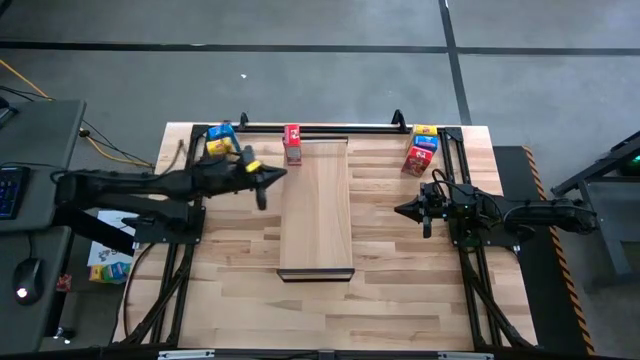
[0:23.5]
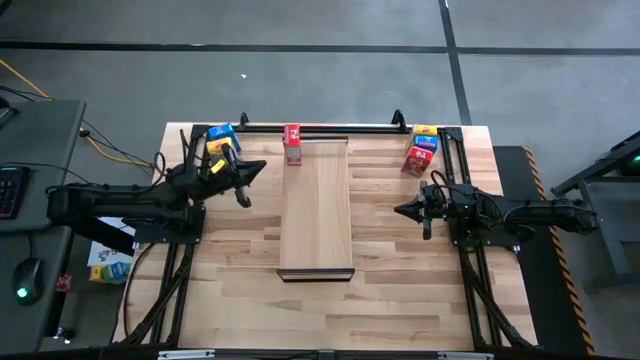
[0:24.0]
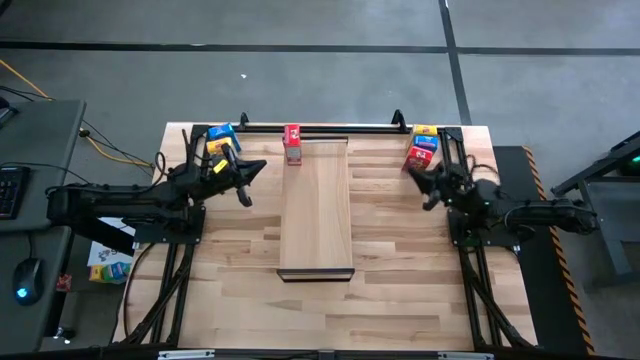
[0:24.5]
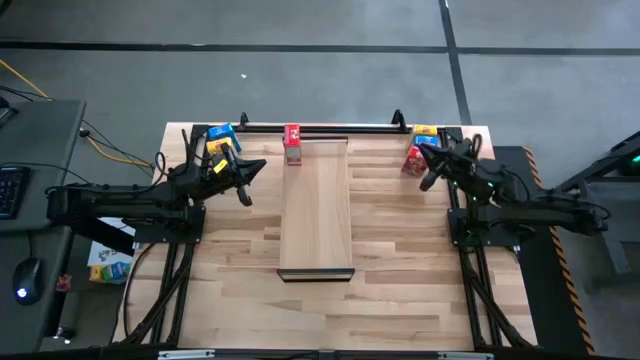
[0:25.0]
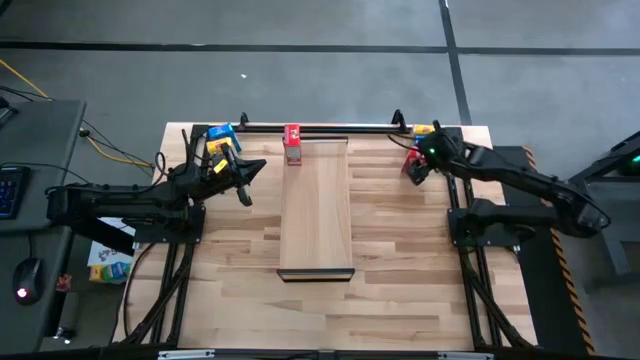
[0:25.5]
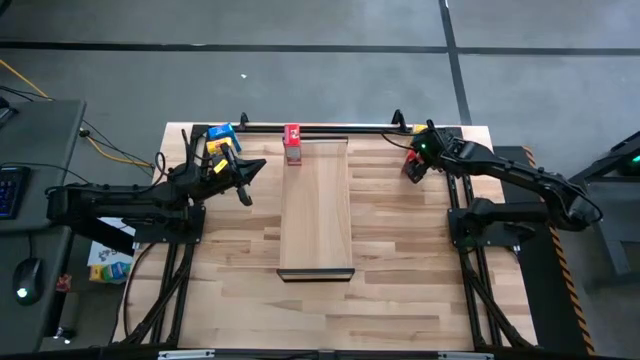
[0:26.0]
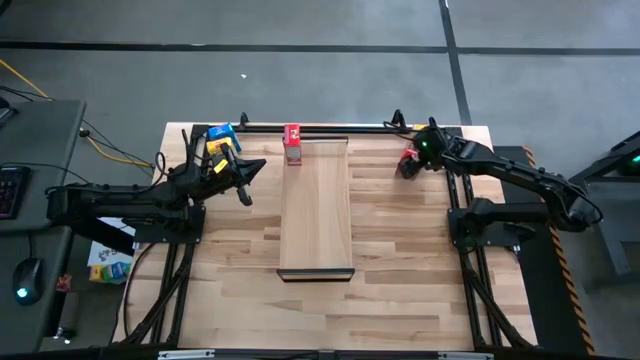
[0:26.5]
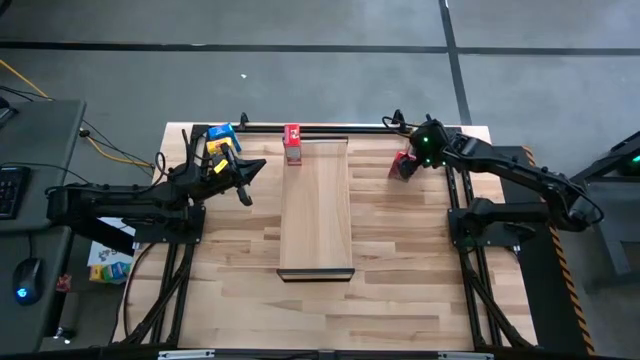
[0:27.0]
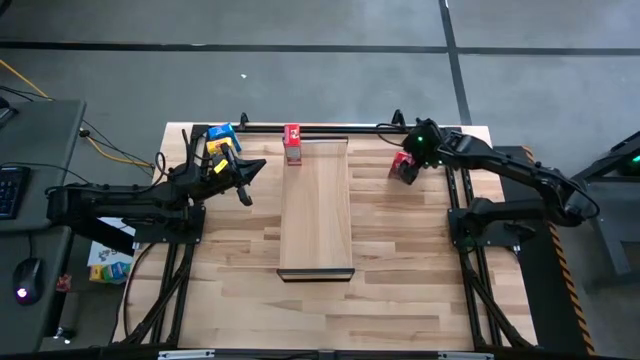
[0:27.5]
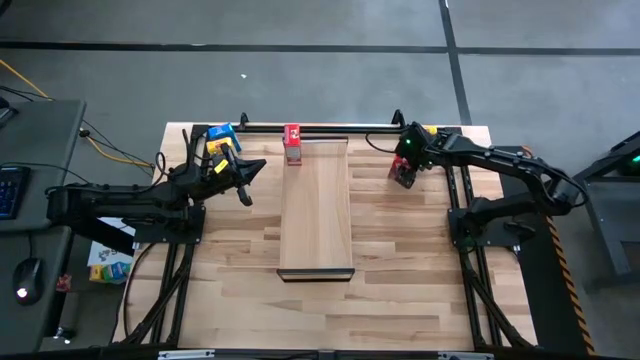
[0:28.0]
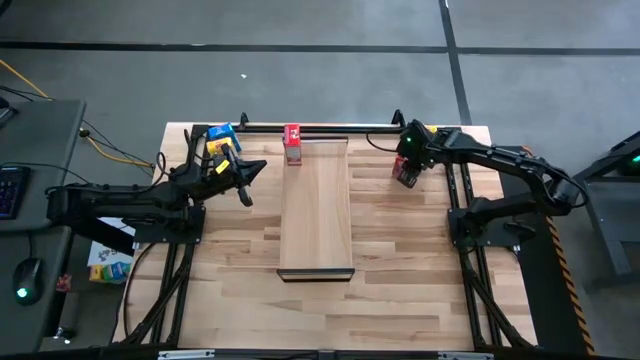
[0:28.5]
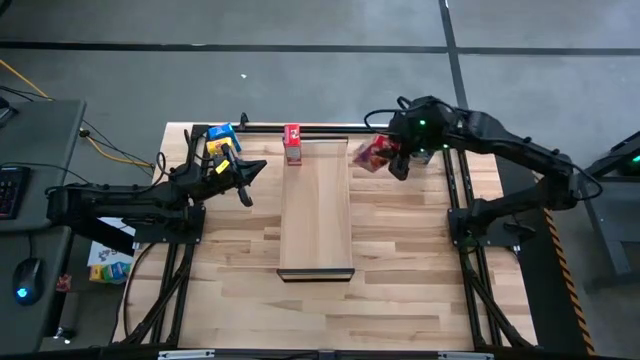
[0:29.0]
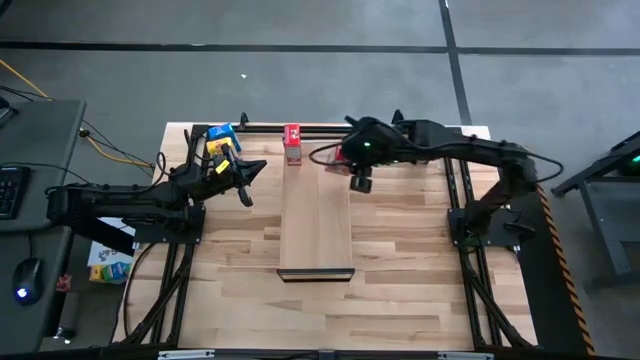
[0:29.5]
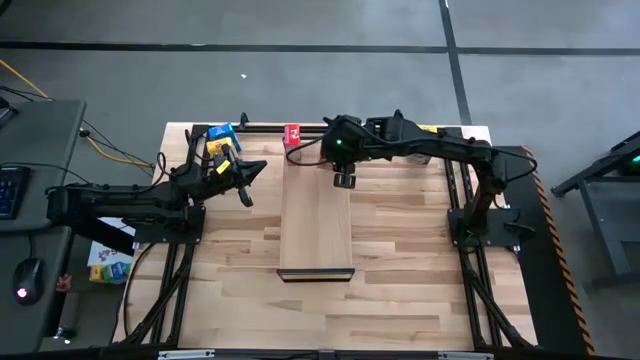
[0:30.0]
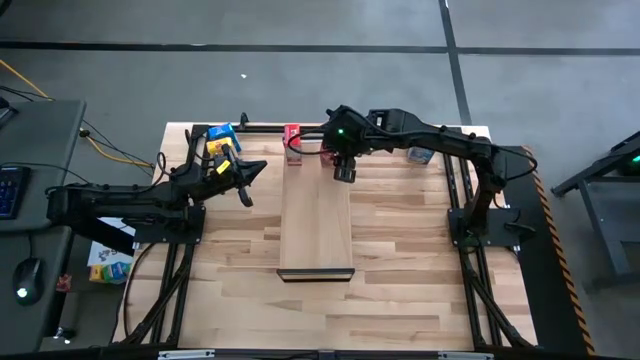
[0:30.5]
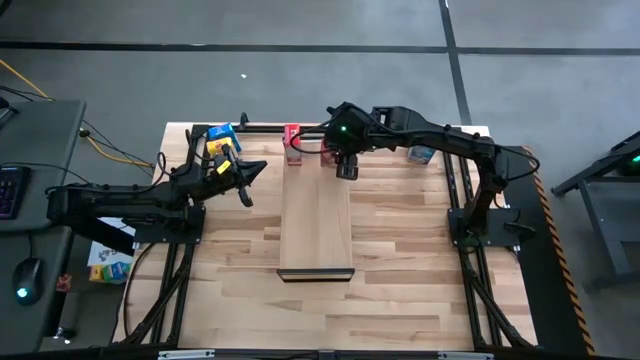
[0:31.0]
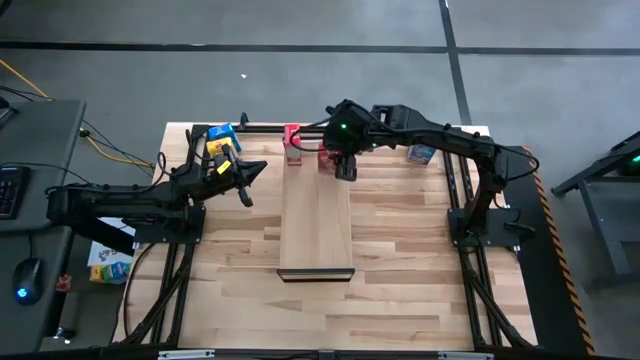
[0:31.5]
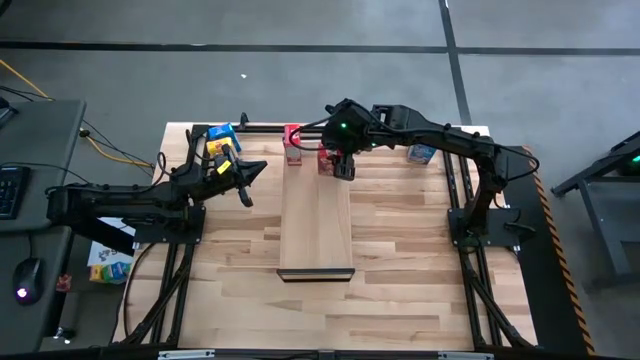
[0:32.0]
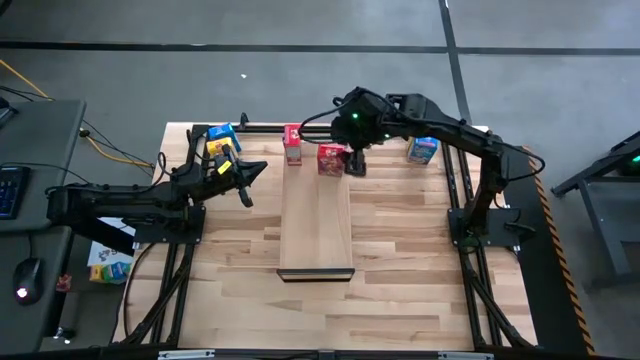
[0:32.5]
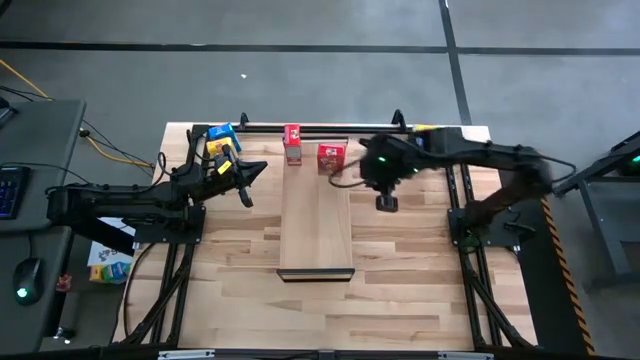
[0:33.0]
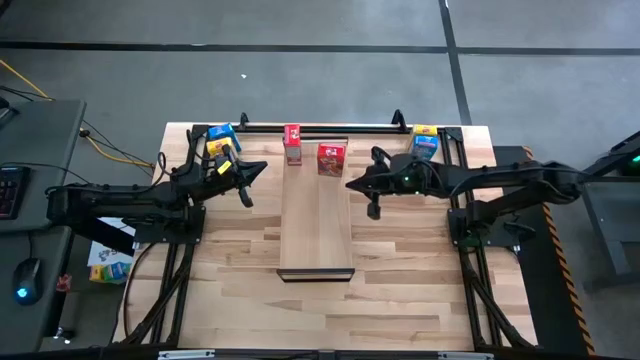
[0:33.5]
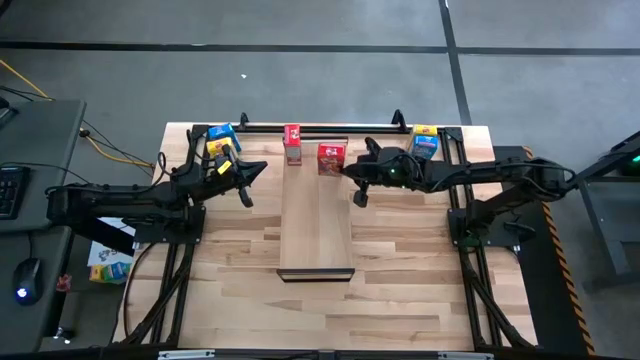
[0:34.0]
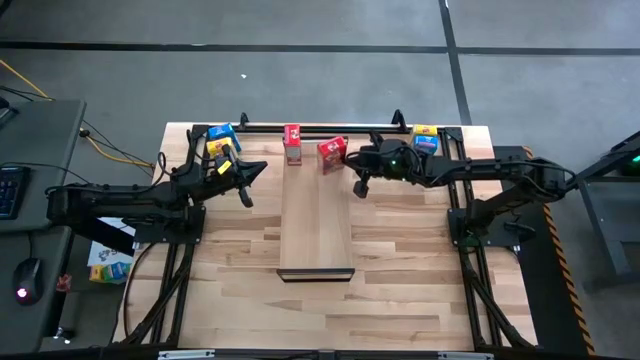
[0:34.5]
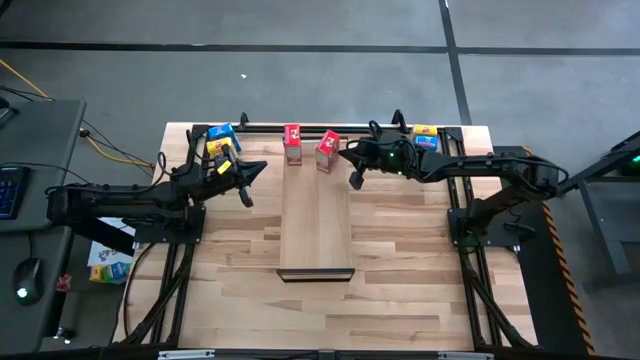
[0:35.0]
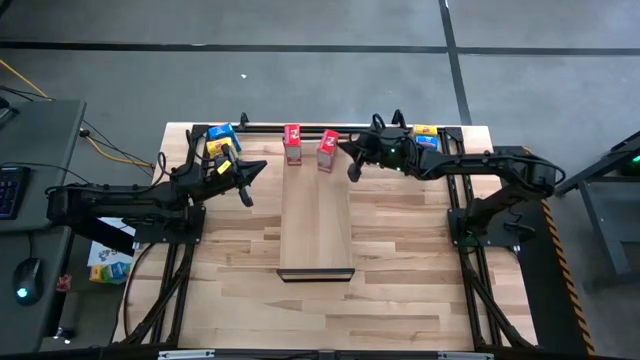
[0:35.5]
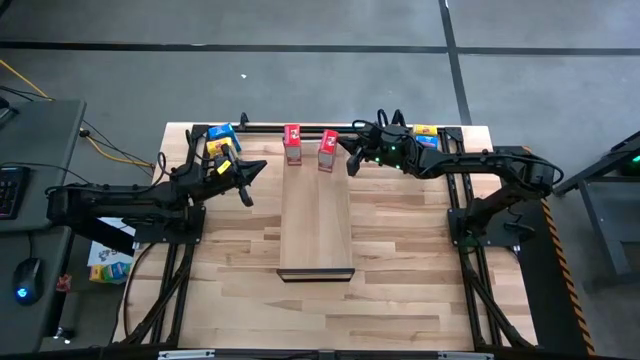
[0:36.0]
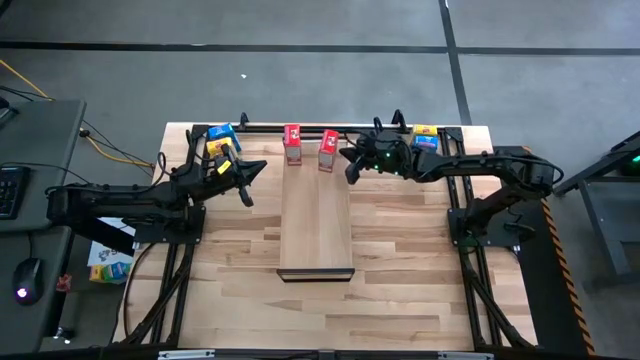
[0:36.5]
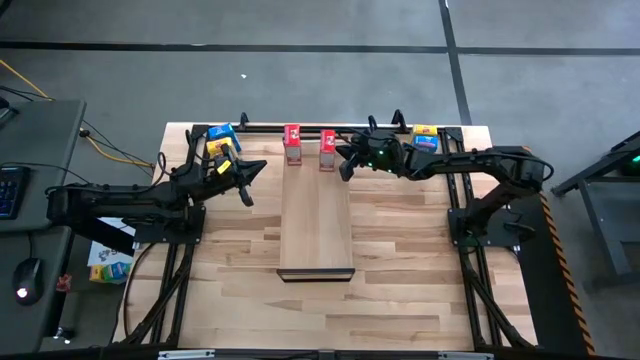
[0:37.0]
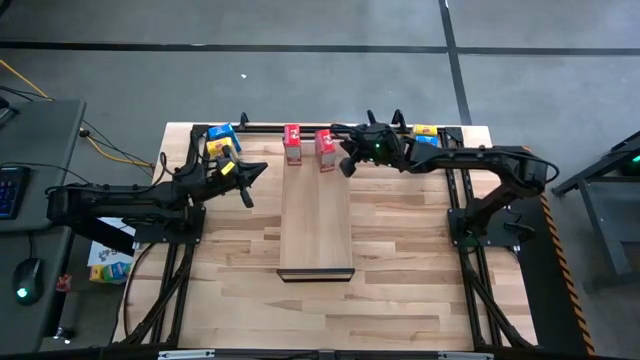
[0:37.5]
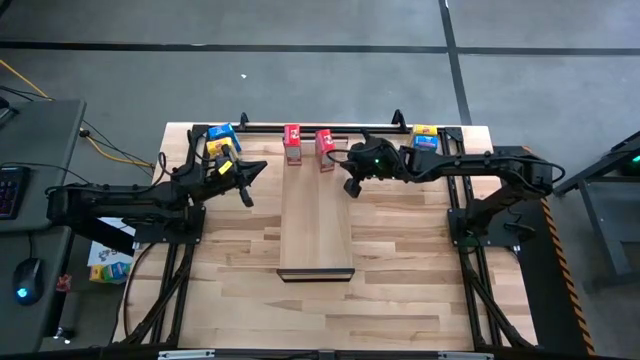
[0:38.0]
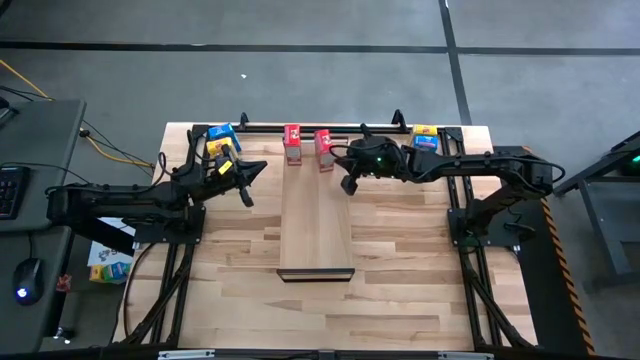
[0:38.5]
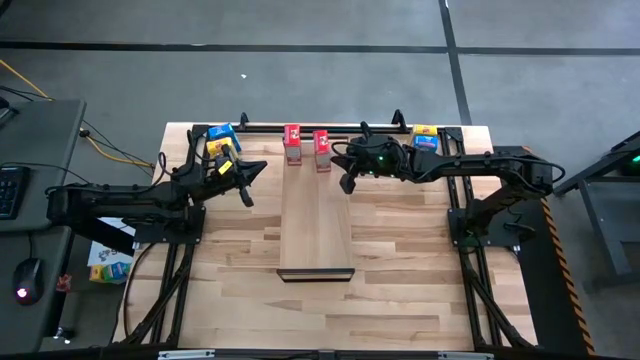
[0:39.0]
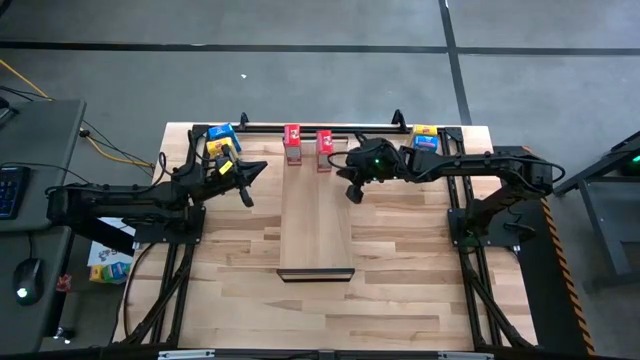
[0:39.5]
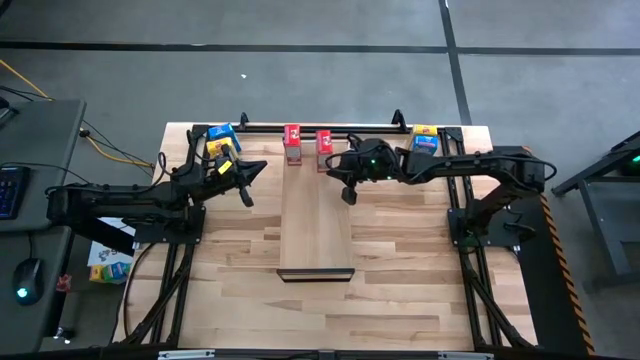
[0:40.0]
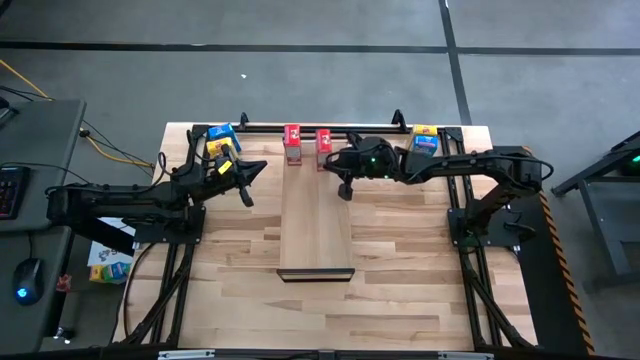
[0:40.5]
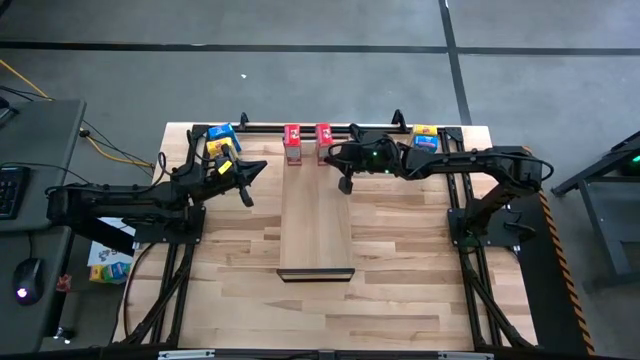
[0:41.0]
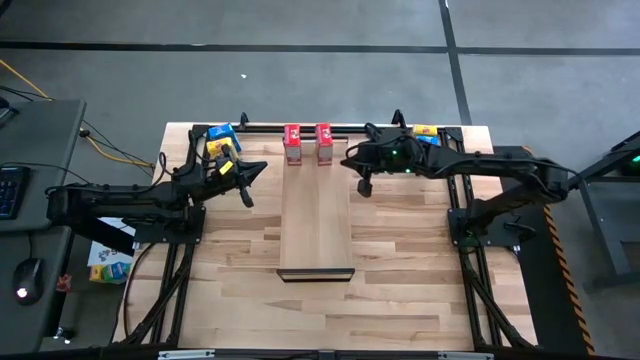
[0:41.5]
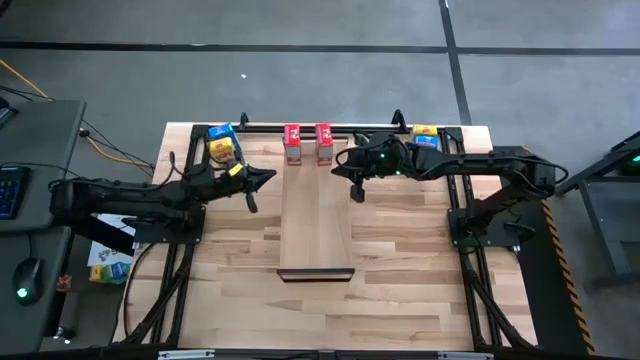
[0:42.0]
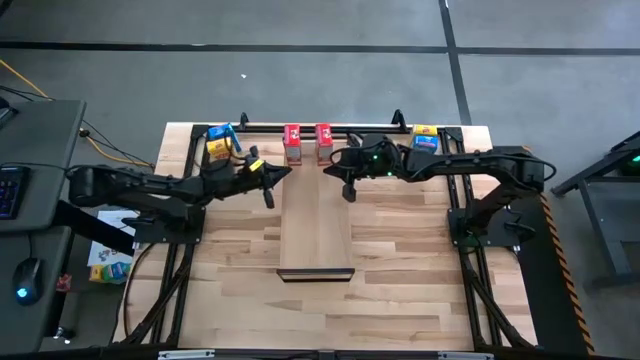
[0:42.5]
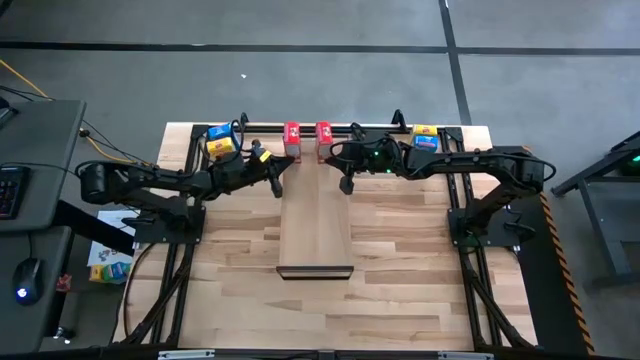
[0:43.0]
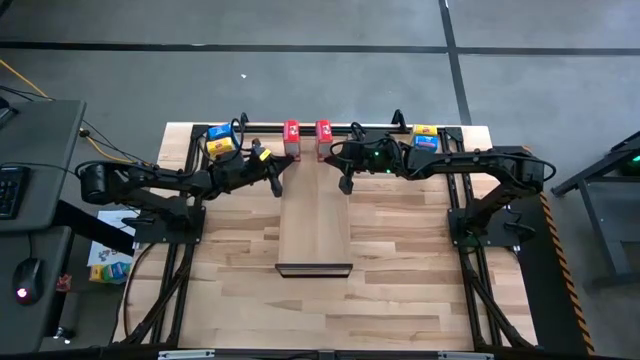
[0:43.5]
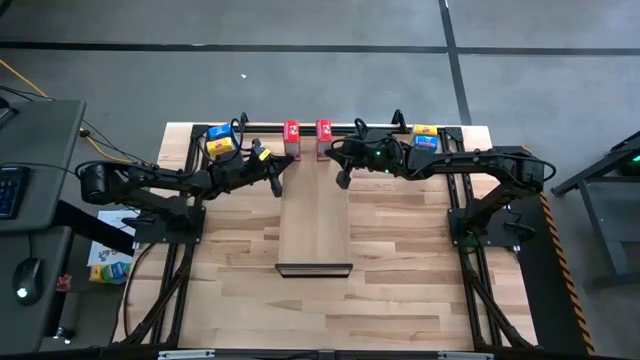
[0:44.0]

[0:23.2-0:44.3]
Task: Stack cereal on shelf
Put the red cereal box and aligned with the red cereal box on the shelf

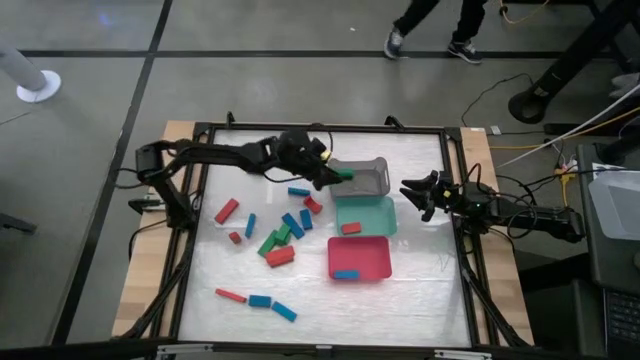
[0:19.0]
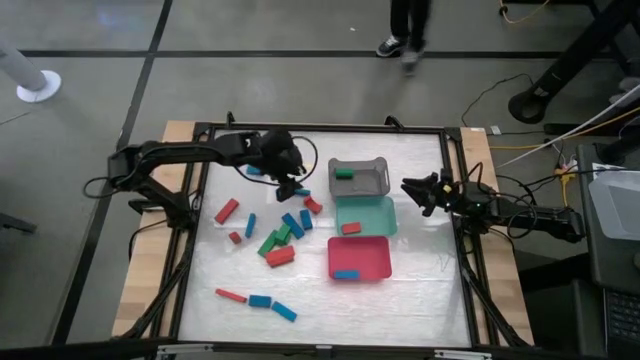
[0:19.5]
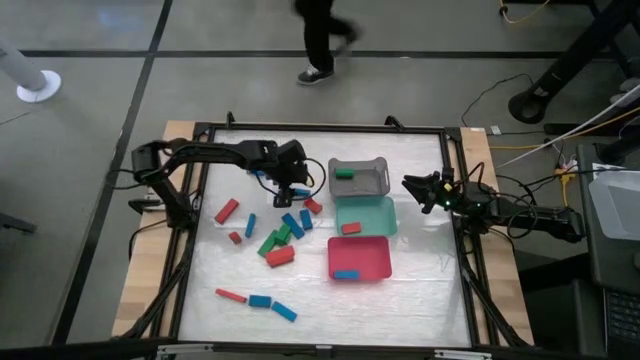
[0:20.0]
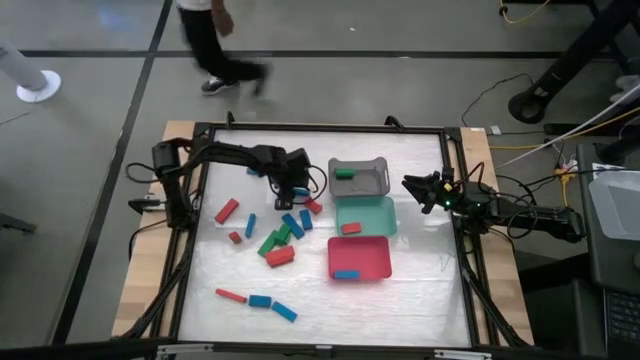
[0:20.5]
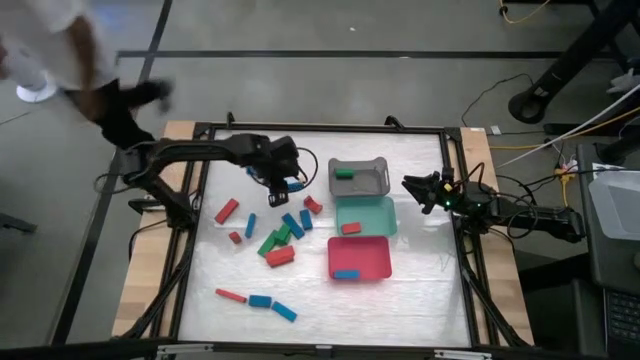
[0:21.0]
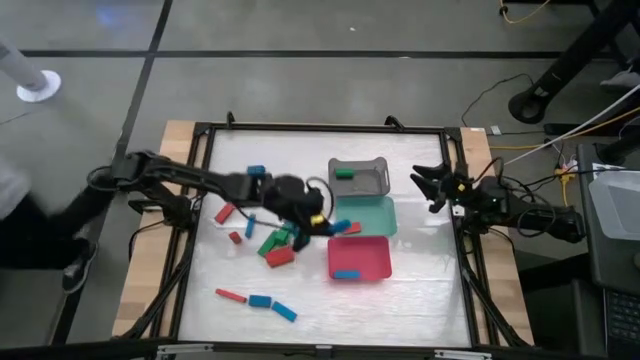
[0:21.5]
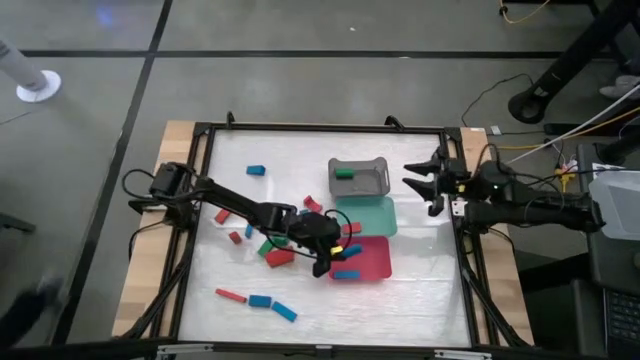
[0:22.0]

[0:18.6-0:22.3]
Task: Sort blocks
Put the blue block into the red bin
